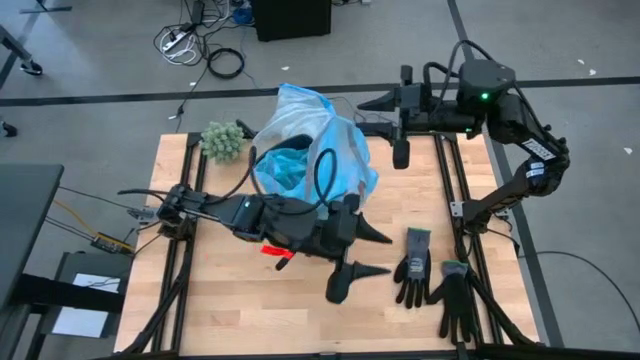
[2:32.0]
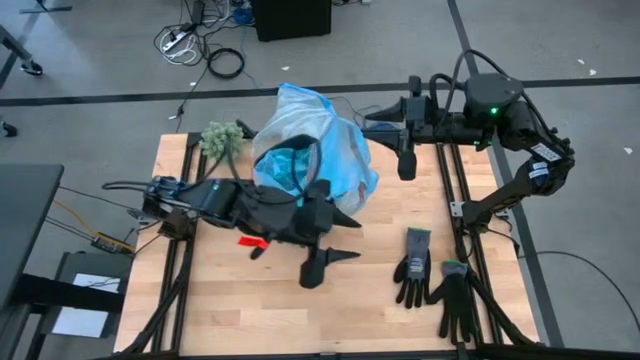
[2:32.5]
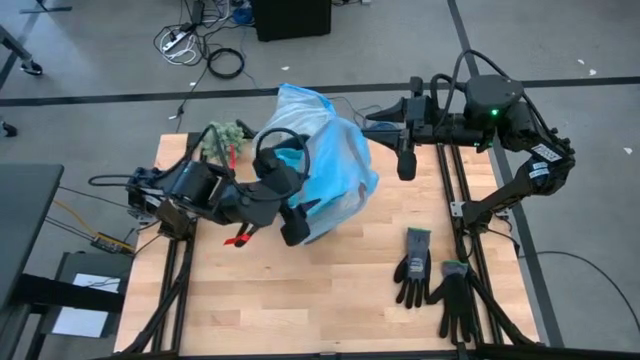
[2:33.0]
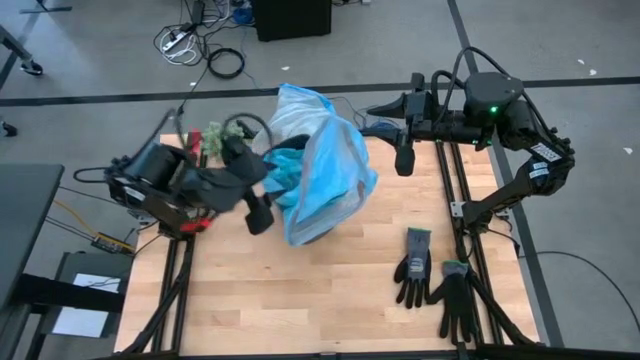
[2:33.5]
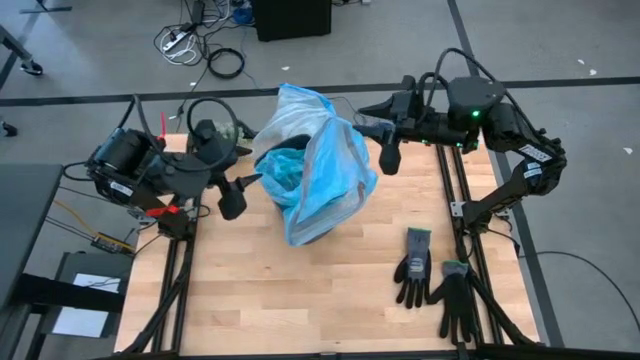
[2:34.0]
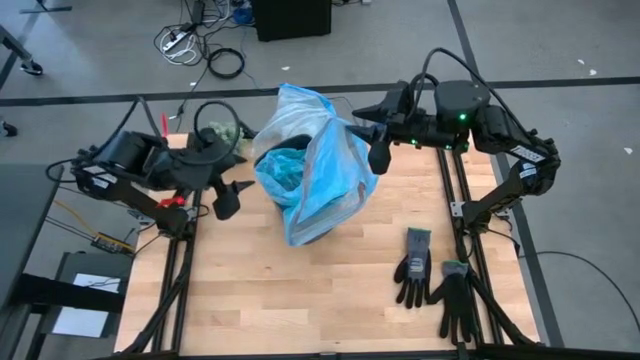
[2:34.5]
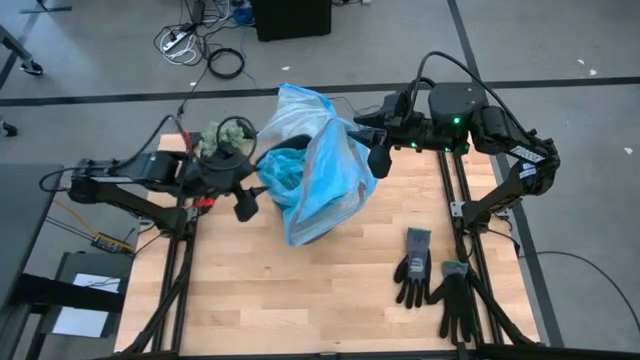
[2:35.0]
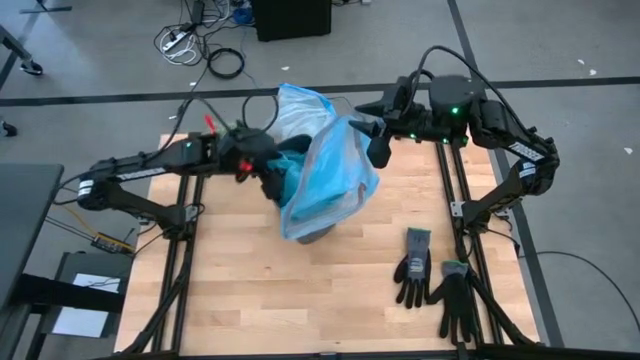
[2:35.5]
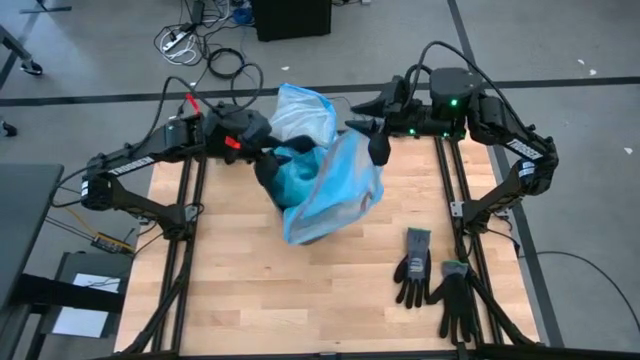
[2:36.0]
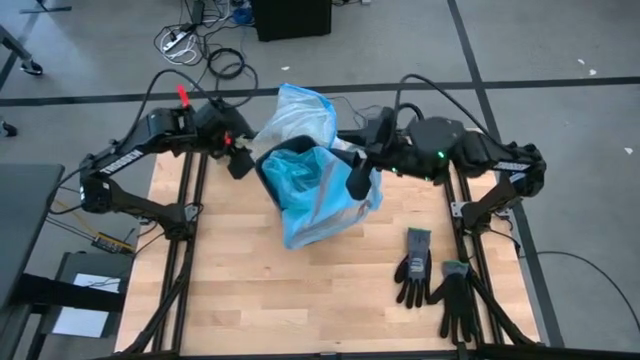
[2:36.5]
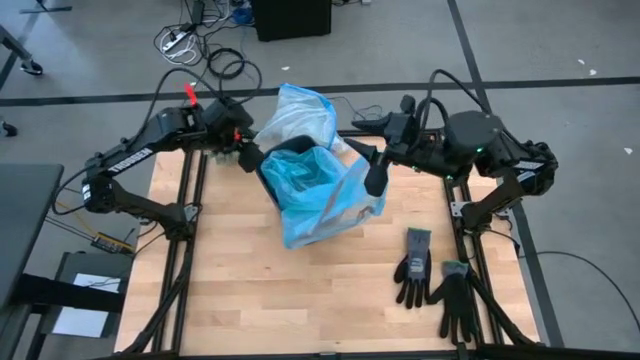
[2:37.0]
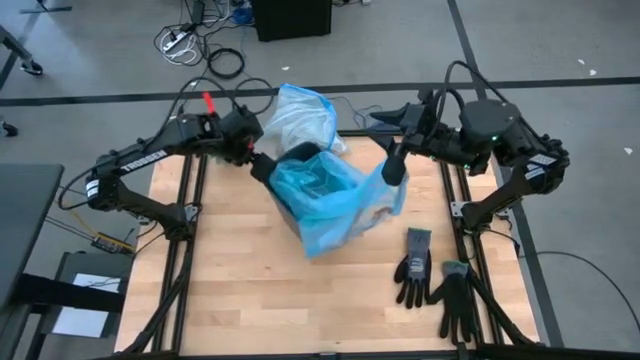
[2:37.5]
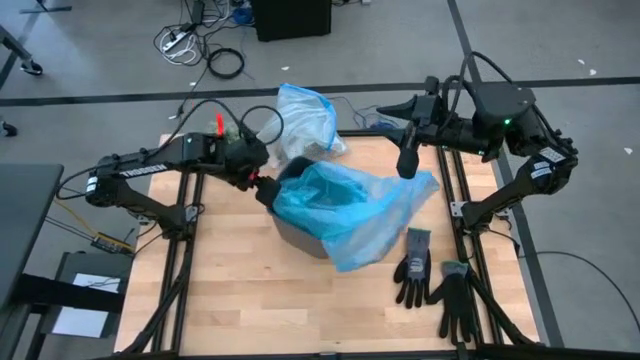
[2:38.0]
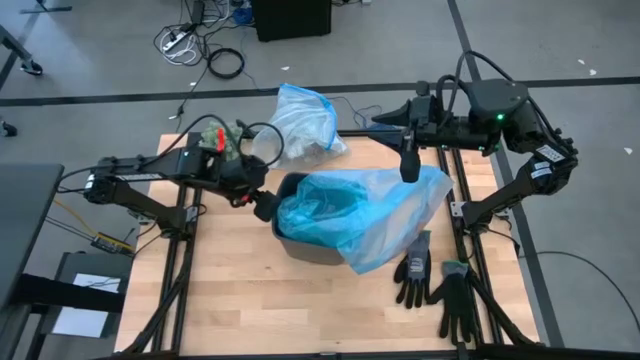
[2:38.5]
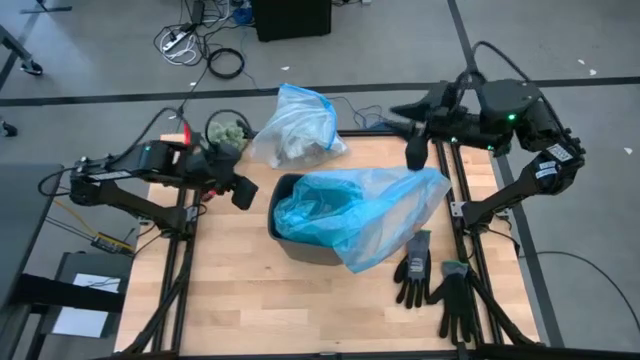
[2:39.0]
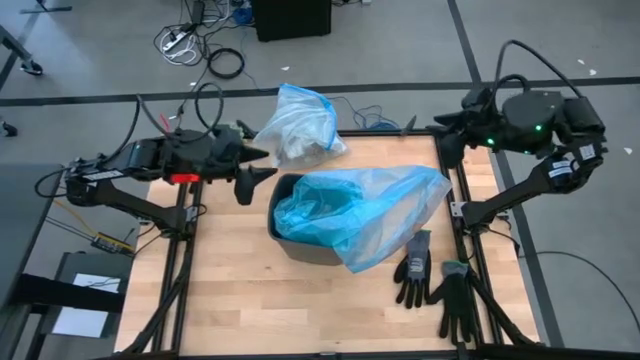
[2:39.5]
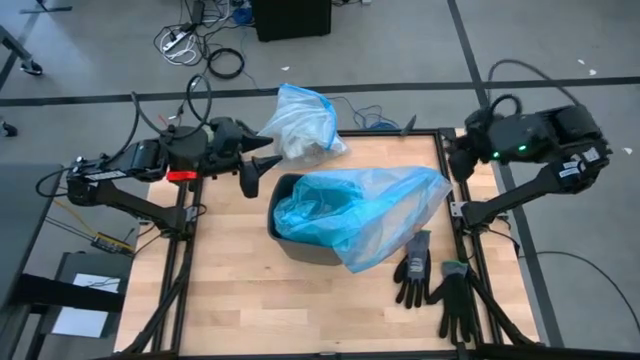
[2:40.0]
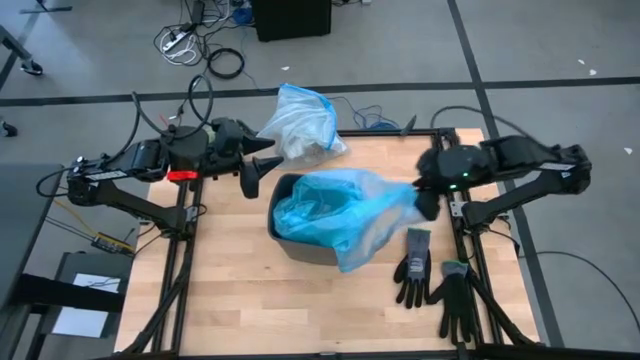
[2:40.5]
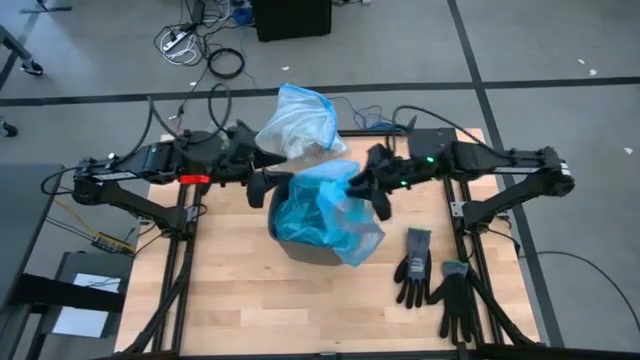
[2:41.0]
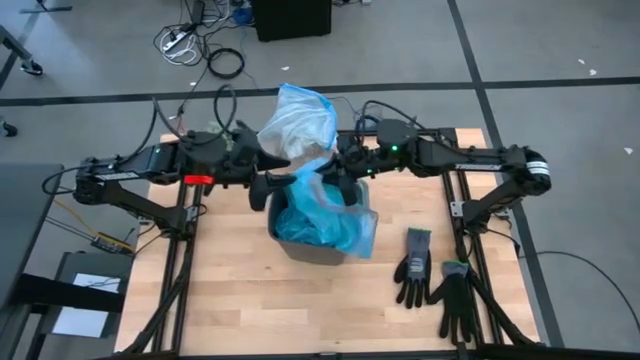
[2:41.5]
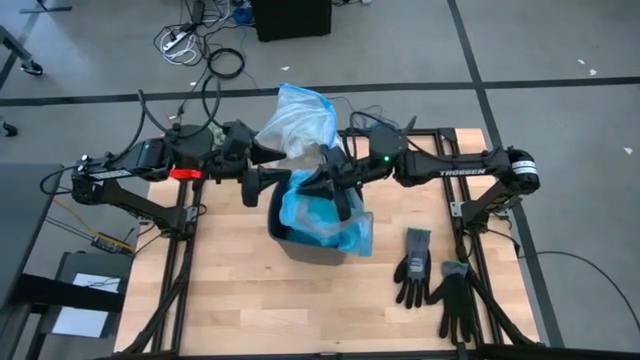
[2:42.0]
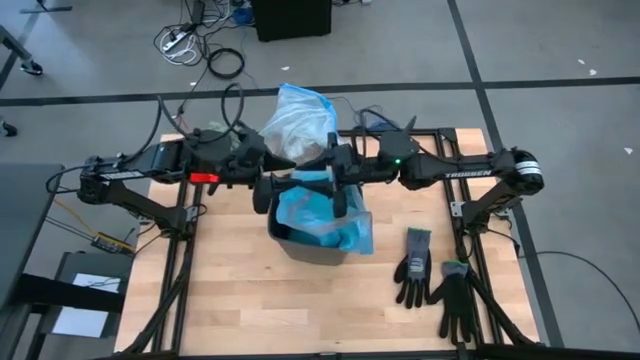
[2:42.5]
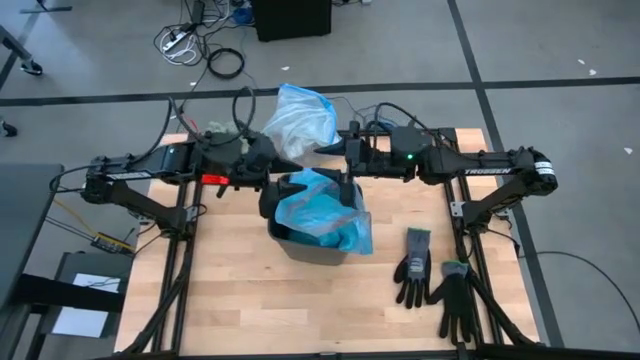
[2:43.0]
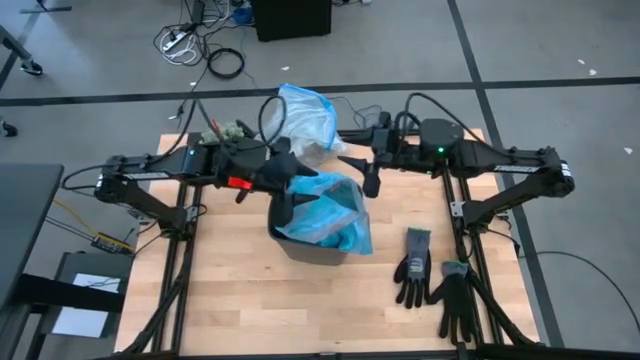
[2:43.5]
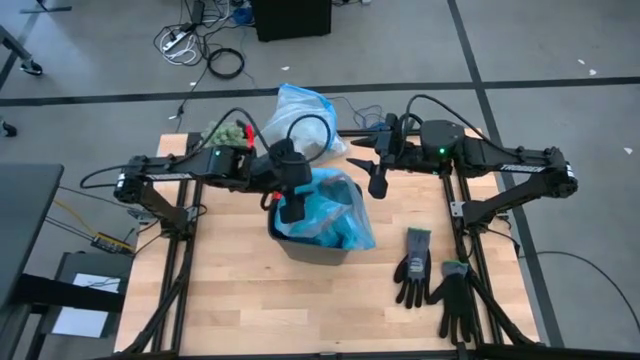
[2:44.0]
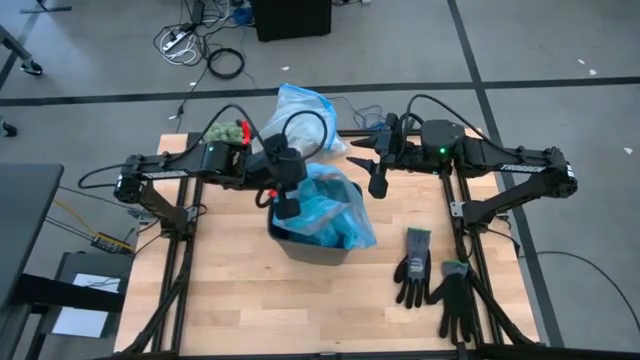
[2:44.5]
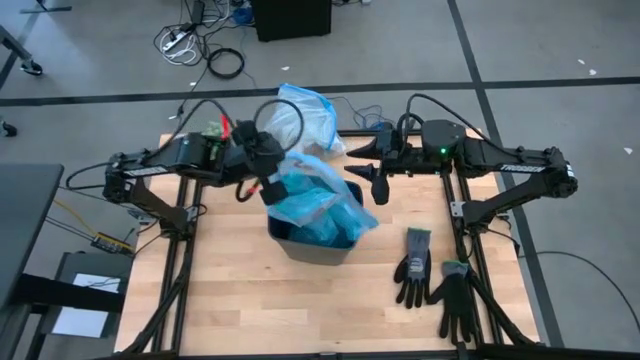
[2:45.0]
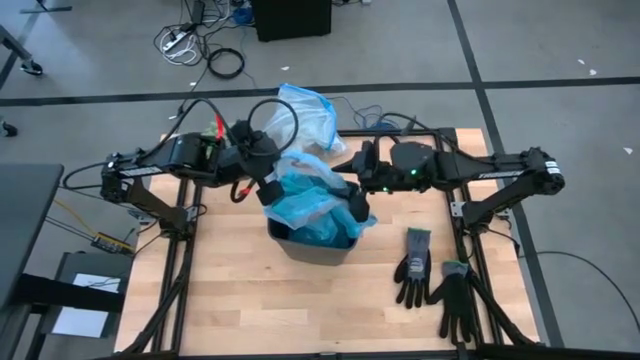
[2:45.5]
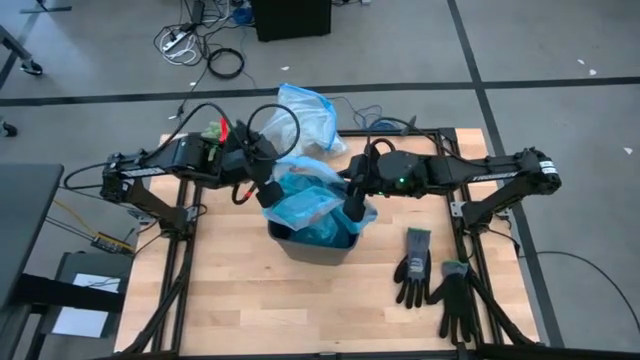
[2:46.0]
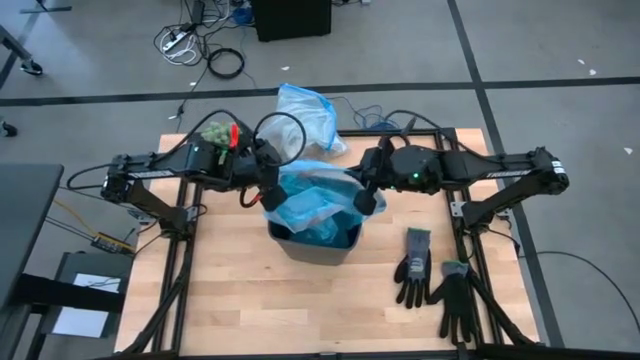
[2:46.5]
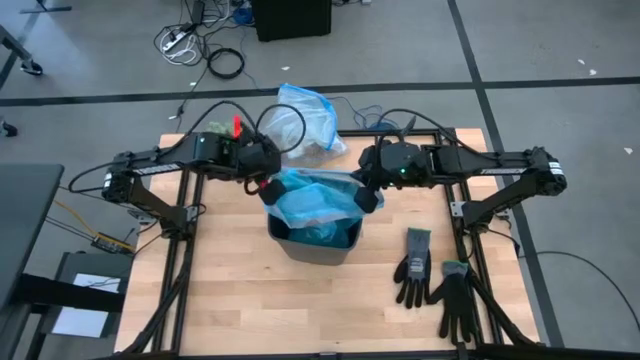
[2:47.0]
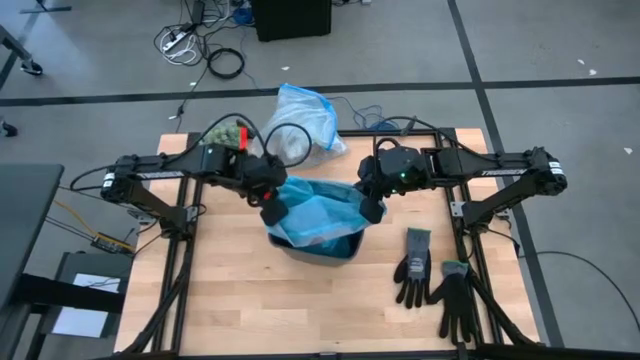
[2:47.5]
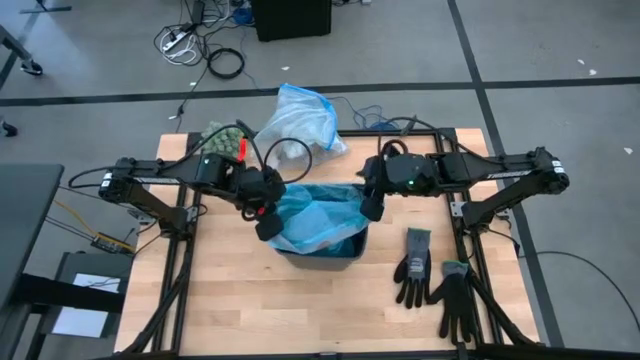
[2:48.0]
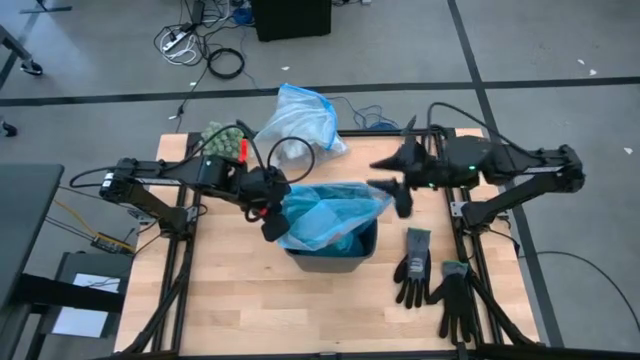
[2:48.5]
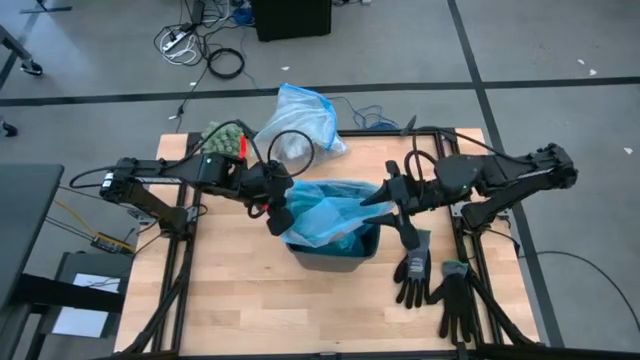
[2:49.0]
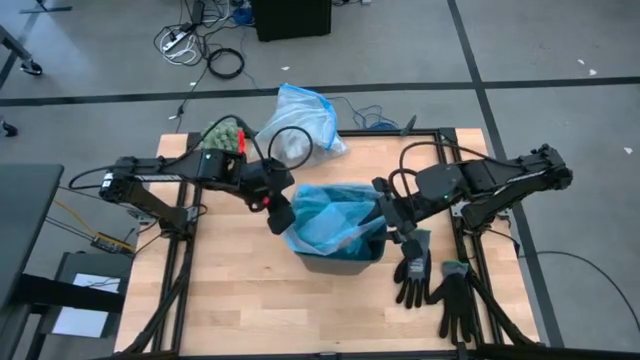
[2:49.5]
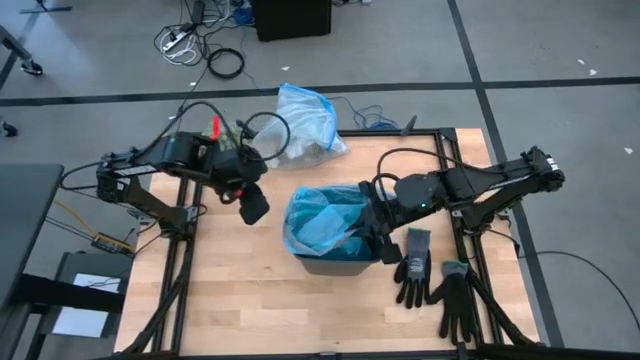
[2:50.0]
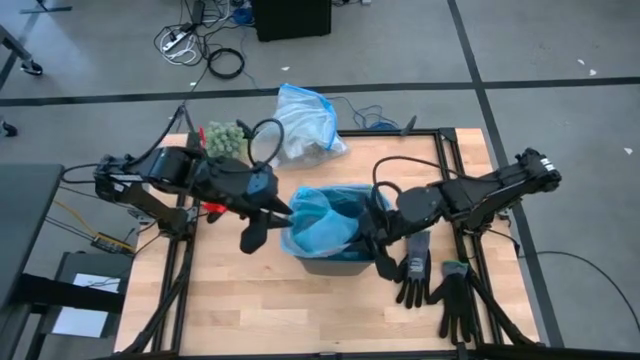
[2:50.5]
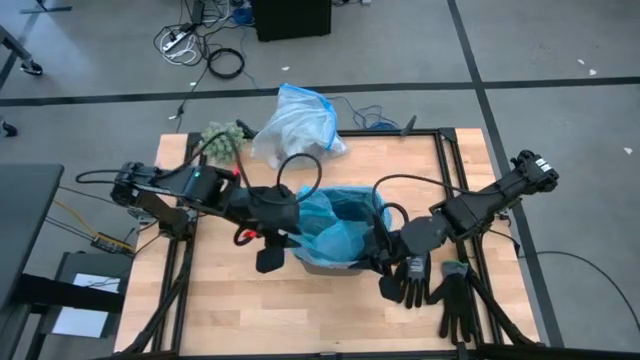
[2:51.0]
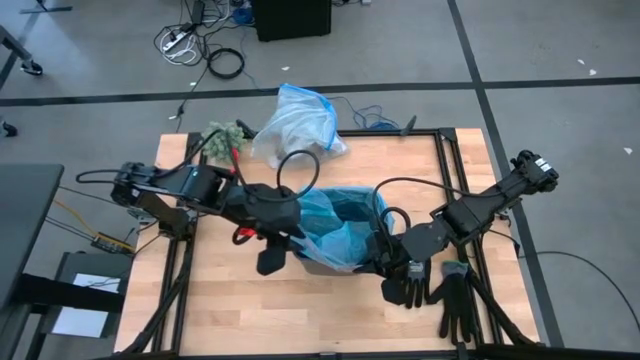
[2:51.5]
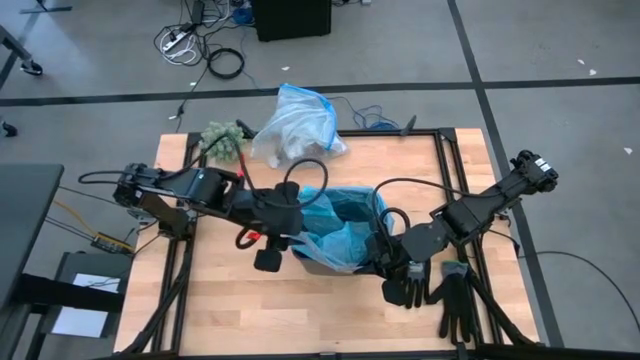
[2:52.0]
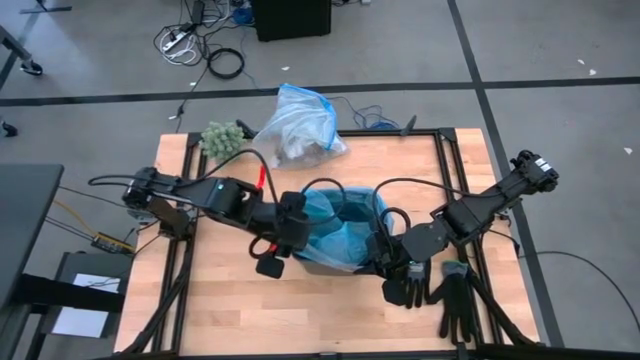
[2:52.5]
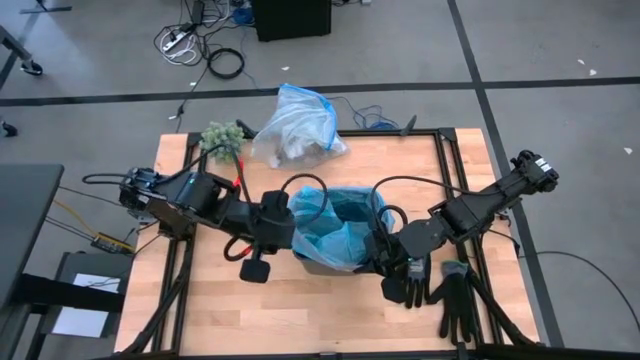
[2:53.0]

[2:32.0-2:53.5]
Task: place trash/remove bag and relplace
Insert the new blue trash bag into the trash bin
